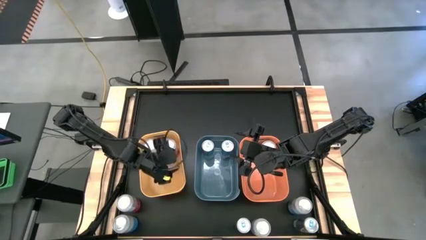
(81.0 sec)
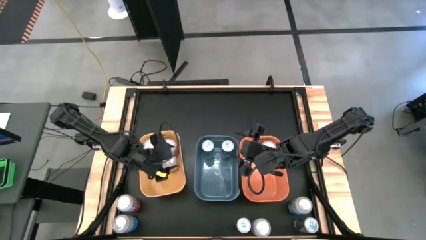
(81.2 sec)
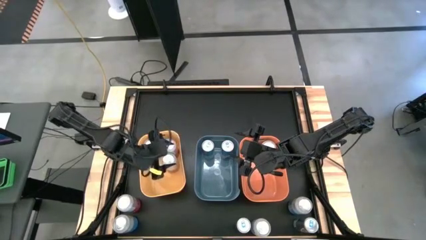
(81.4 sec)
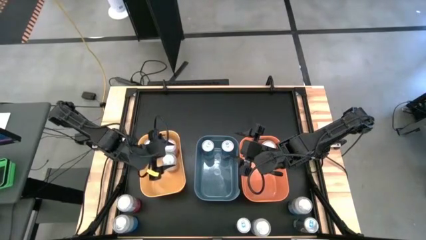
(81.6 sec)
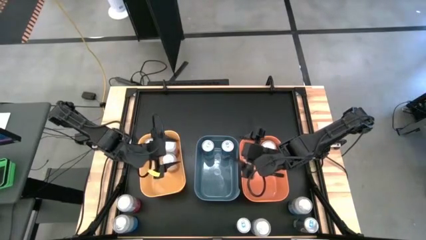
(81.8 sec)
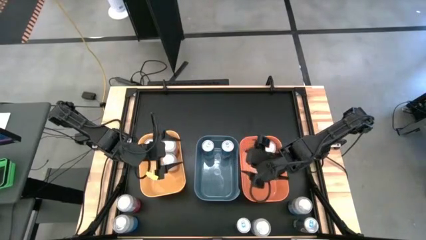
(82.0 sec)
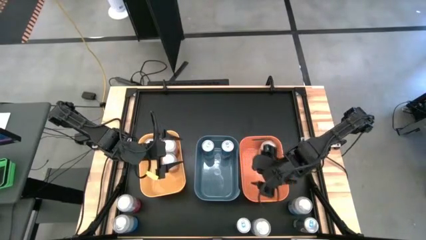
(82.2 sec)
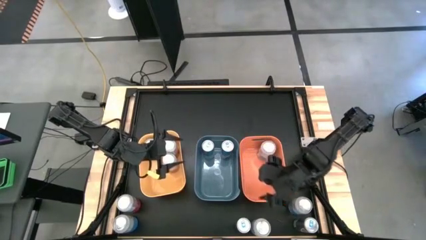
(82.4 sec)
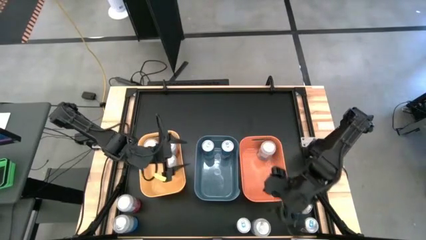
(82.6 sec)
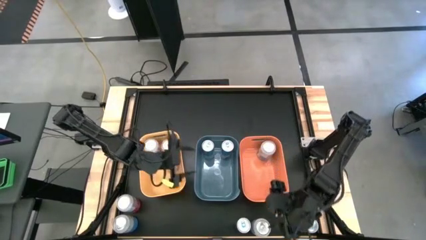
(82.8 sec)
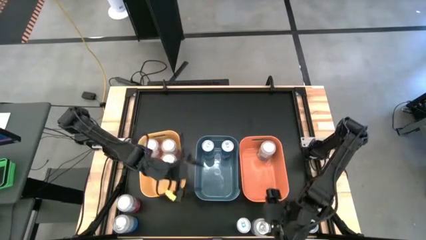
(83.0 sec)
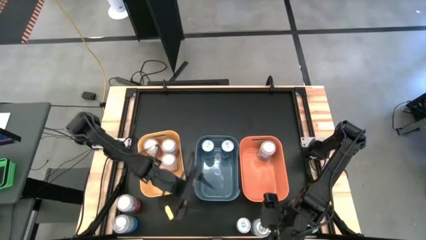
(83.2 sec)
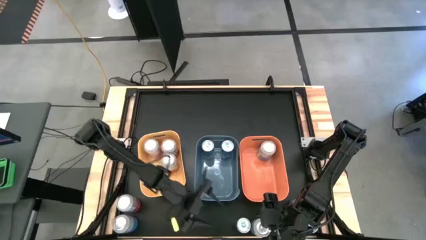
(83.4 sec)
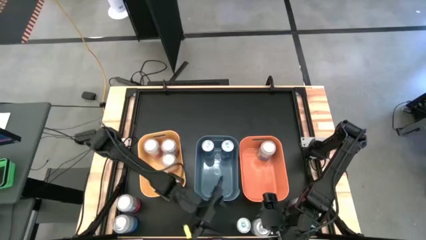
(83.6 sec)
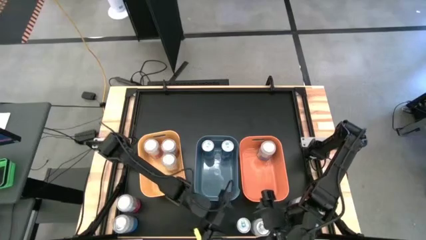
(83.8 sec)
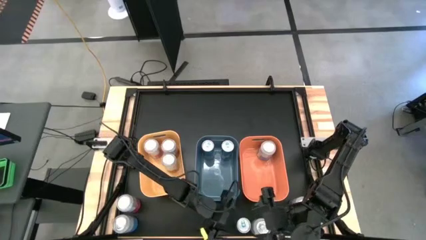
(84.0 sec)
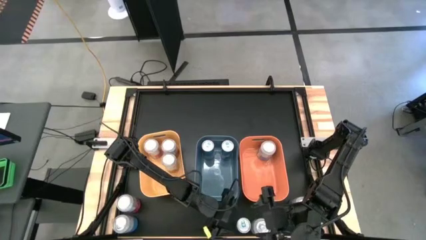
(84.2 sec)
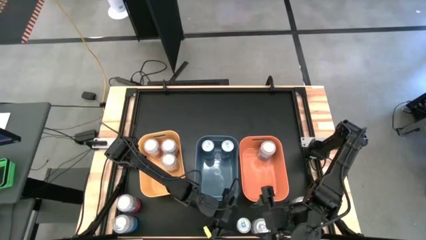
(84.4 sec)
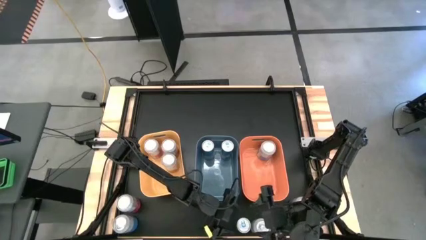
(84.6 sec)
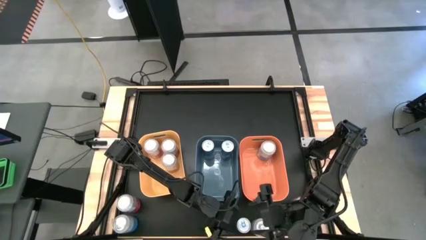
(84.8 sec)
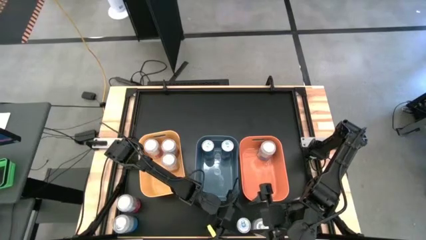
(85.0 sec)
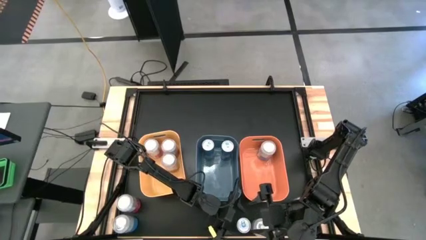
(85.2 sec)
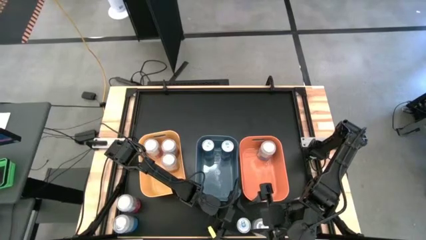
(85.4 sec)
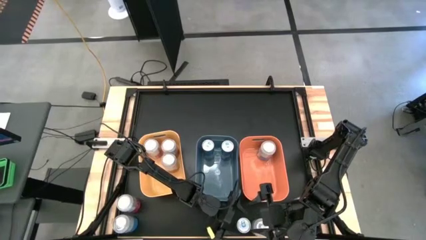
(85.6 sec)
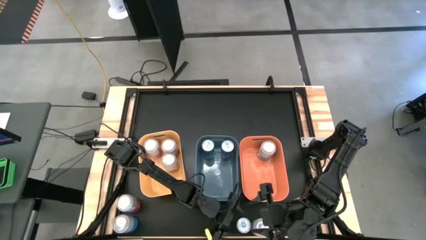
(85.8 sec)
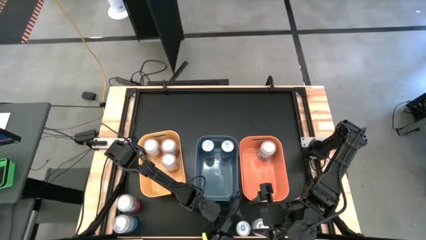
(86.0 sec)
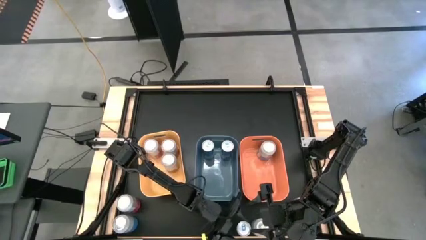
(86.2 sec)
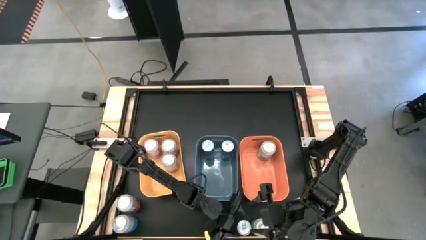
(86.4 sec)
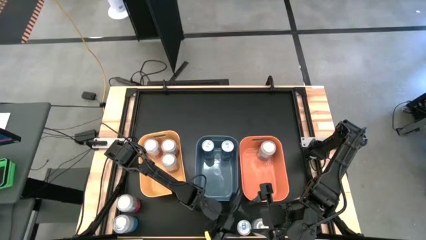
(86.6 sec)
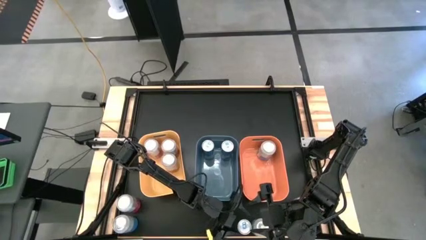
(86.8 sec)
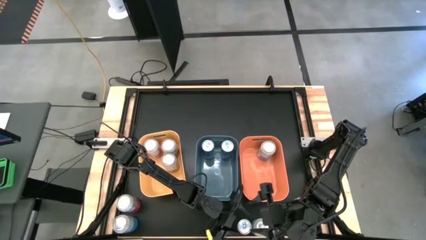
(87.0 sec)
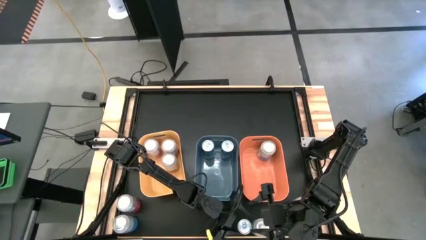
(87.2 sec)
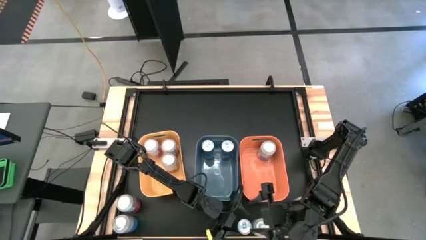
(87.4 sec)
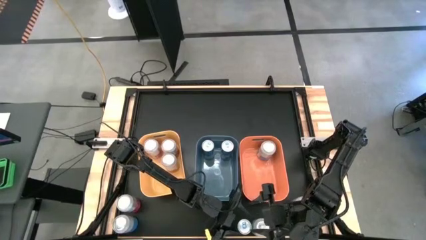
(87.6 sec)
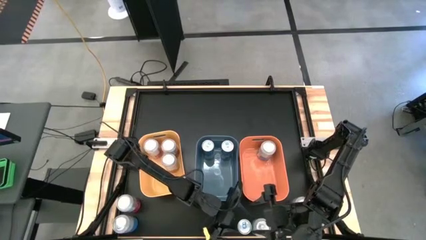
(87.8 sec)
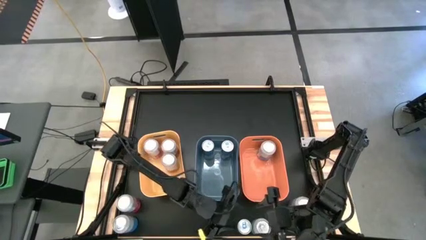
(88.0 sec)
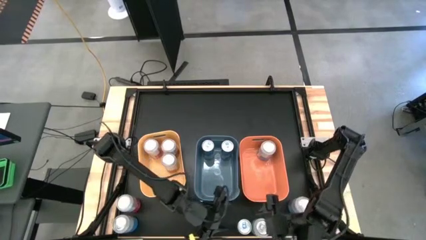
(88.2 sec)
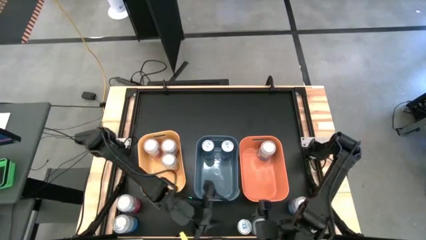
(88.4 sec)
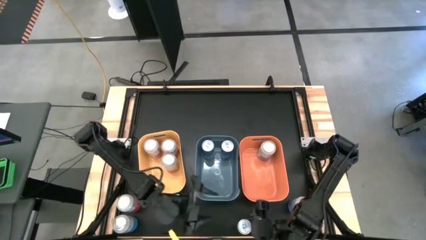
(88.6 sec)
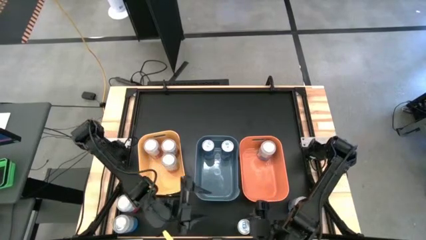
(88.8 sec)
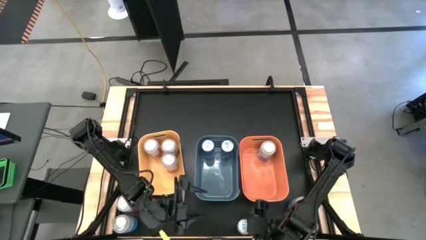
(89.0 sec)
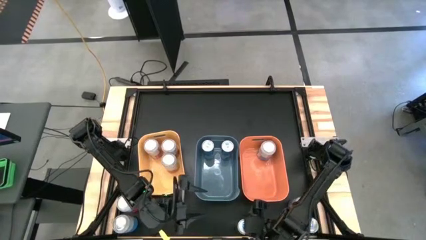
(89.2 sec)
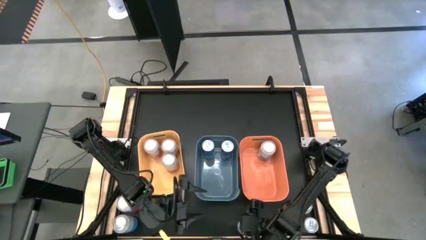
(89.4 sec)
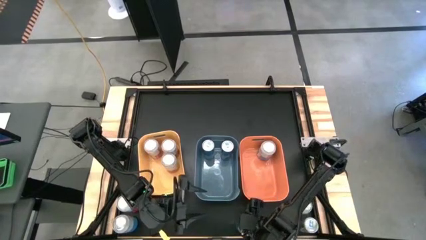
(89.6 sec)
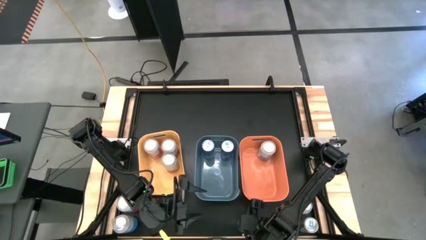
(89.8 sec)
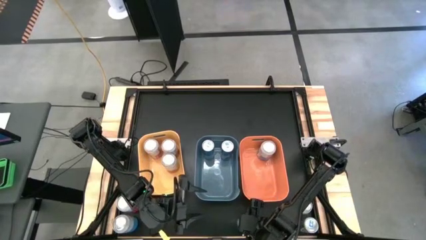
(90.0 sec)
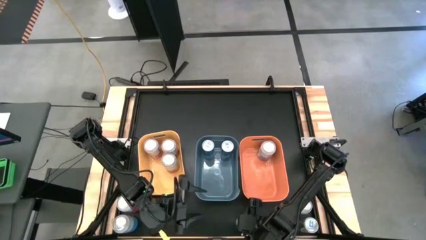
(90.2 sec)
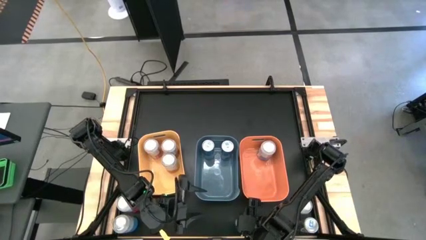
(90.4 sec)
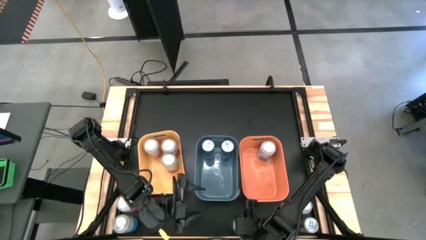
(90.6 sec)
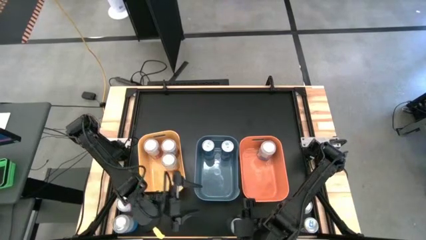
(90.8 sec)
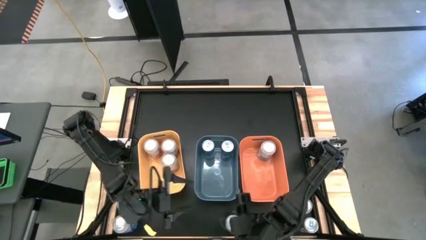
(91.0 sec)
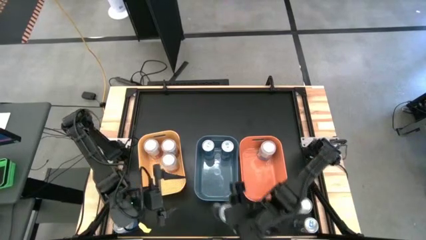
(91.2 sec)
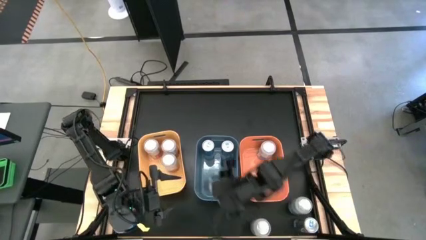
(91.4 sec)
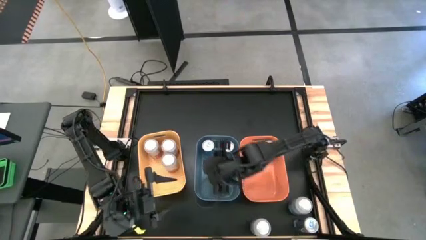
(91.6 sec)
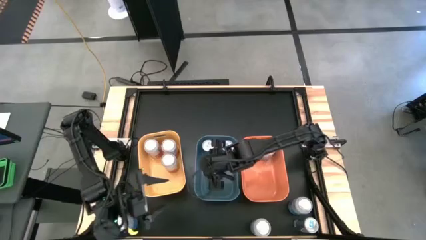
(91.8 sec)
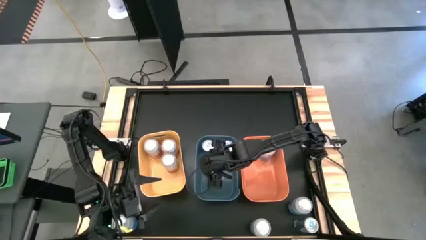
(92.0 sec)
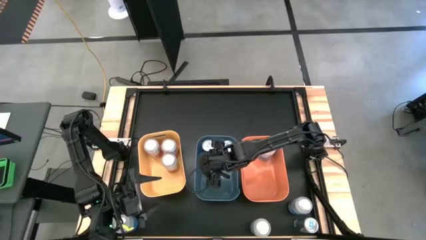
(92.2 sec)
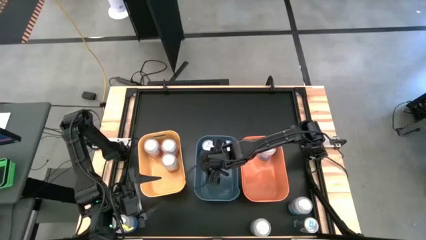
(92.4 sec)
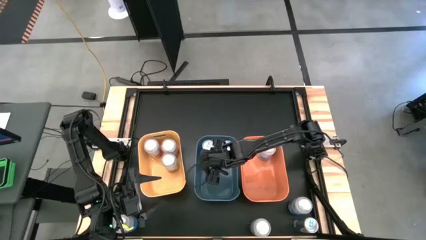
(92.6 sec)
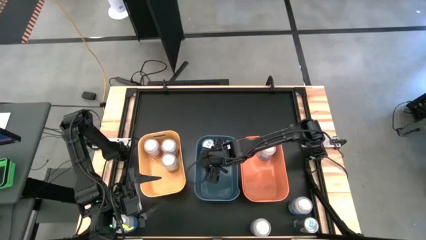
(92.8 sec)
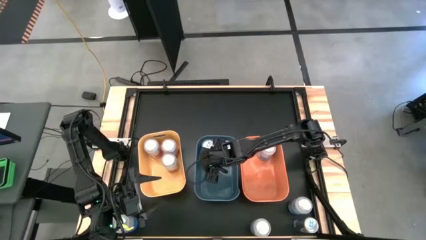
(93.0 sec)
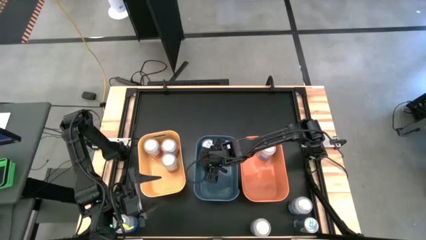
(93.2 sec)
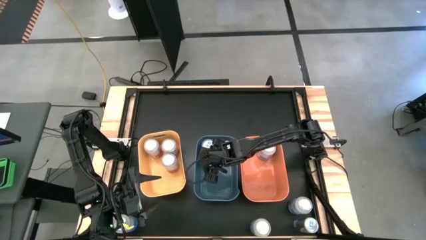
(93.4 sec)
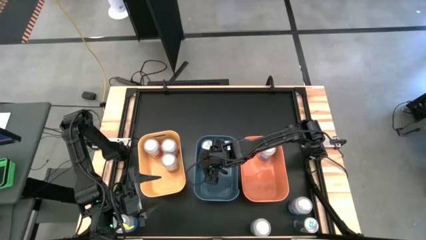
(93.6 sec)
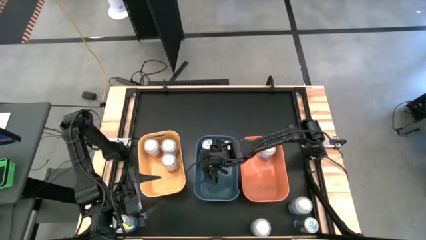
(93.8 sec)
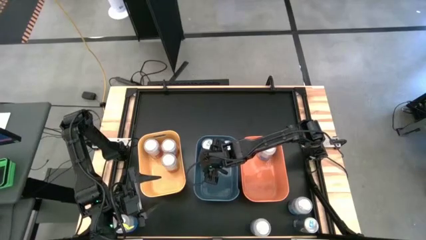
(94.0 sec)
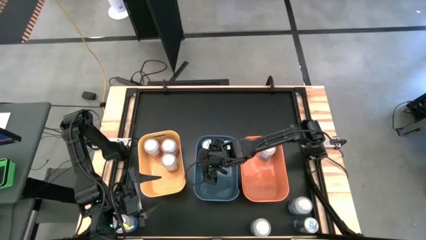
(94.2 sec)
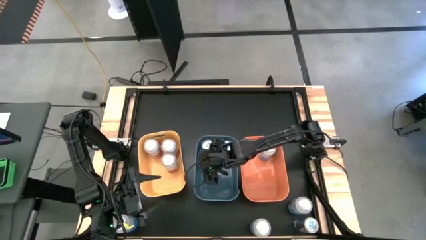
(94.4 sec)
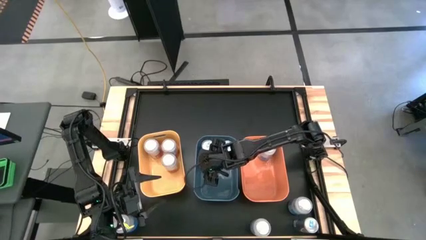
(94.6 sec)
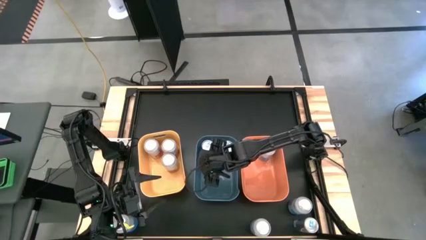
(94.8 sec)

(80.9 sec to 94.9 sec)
Task: Sort soda cans
Put the left blue soda can into the blue bin
